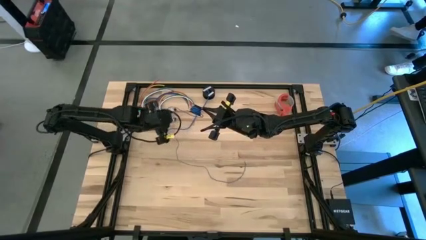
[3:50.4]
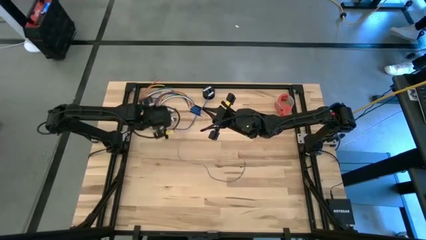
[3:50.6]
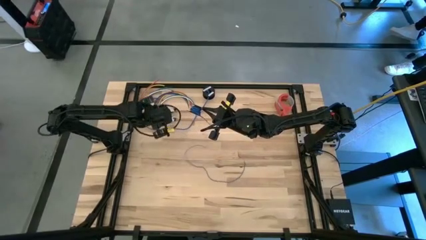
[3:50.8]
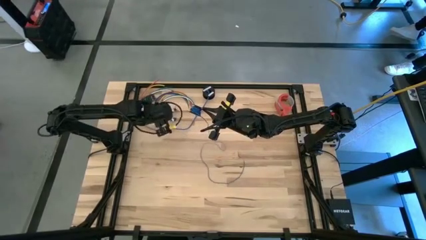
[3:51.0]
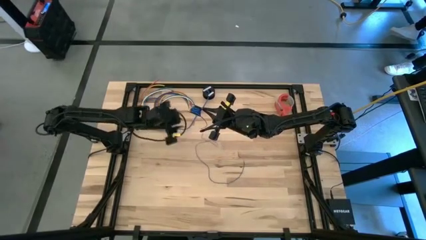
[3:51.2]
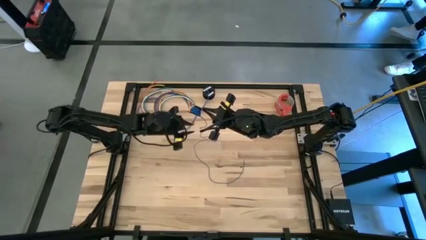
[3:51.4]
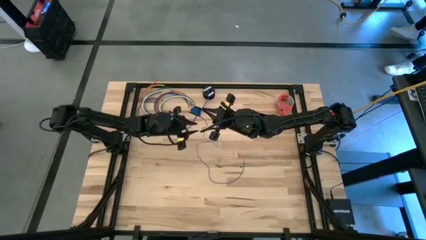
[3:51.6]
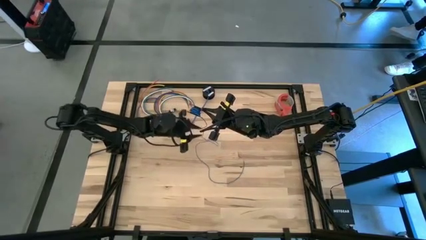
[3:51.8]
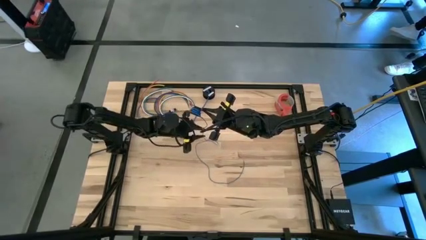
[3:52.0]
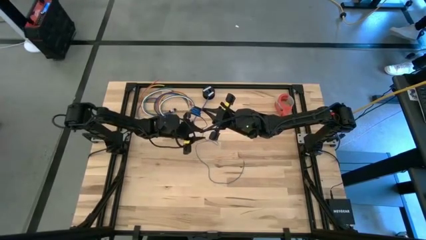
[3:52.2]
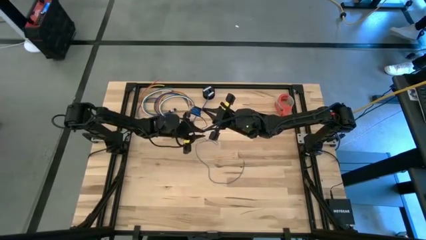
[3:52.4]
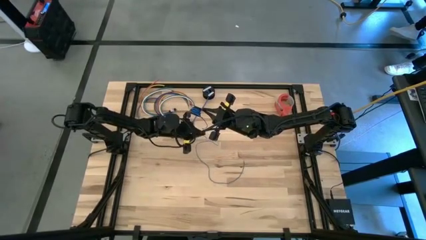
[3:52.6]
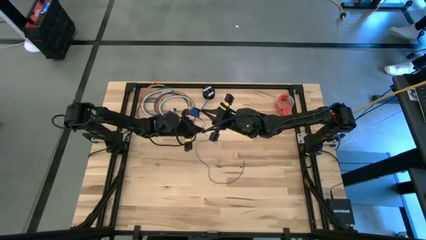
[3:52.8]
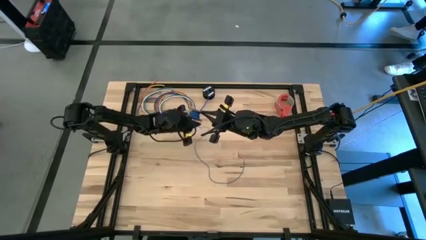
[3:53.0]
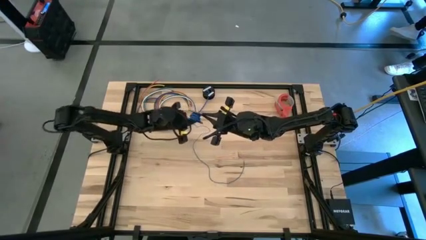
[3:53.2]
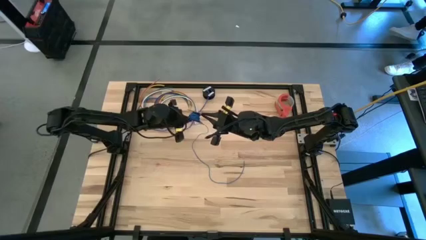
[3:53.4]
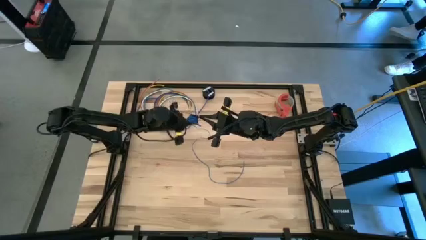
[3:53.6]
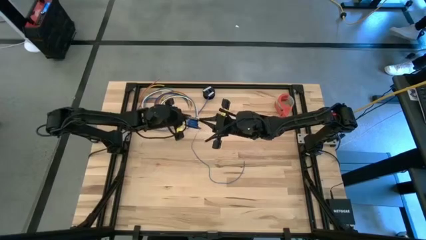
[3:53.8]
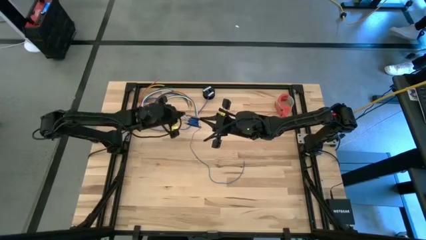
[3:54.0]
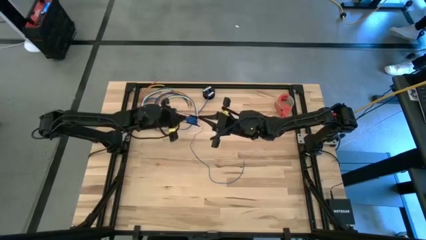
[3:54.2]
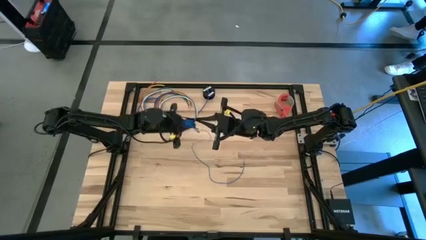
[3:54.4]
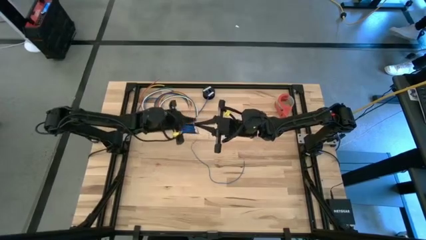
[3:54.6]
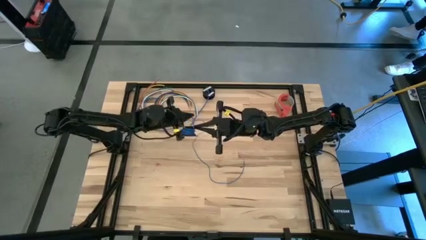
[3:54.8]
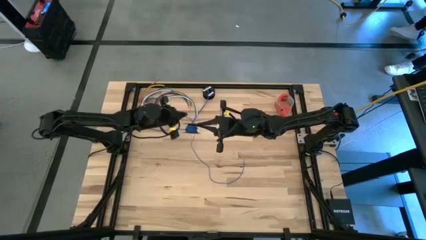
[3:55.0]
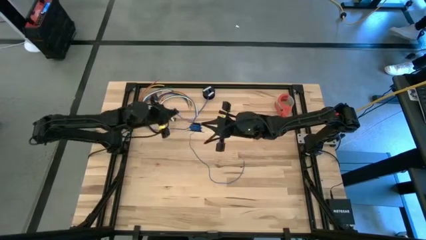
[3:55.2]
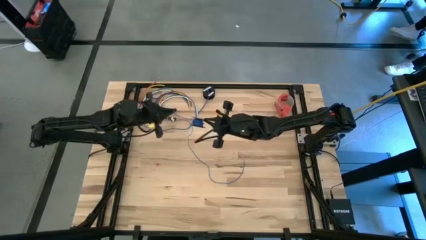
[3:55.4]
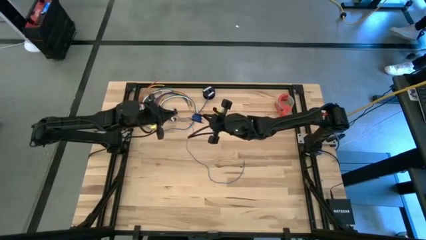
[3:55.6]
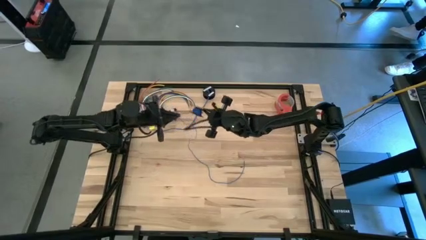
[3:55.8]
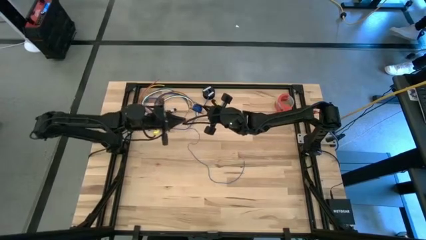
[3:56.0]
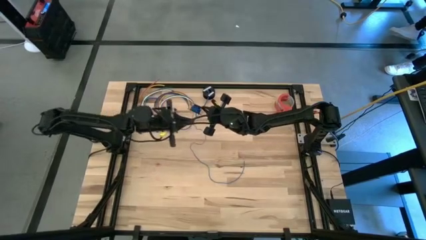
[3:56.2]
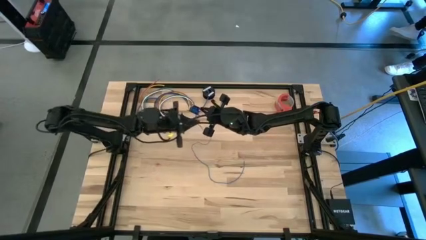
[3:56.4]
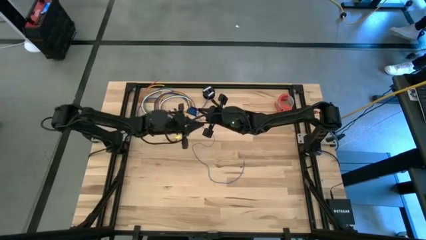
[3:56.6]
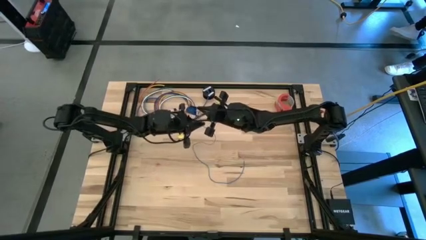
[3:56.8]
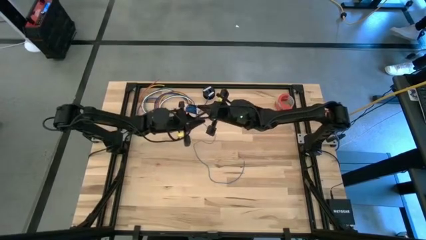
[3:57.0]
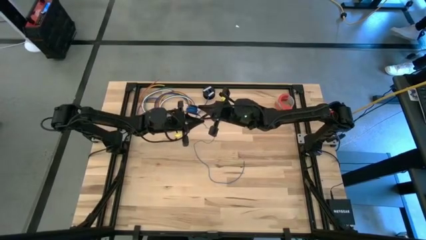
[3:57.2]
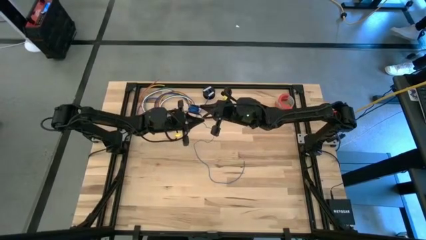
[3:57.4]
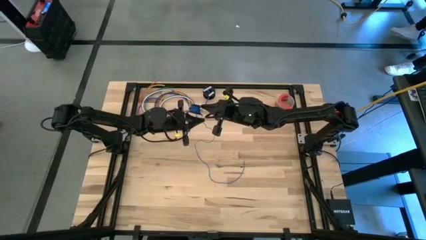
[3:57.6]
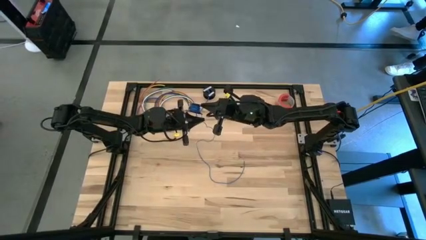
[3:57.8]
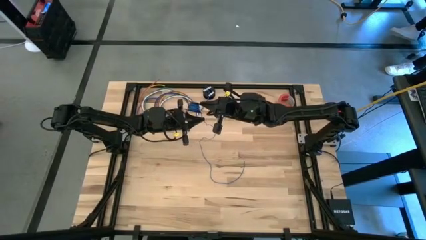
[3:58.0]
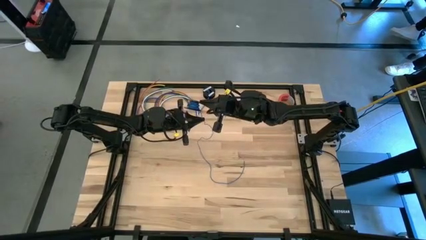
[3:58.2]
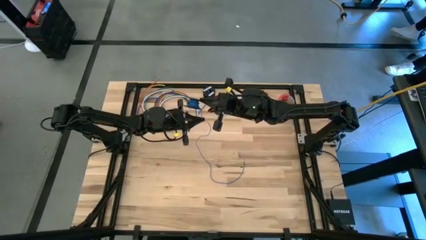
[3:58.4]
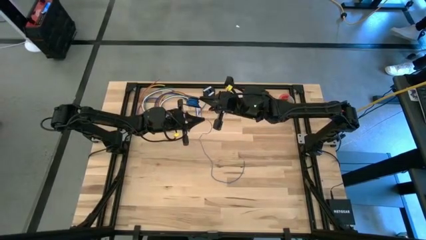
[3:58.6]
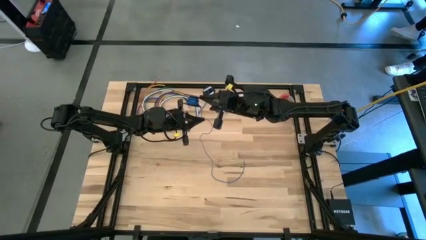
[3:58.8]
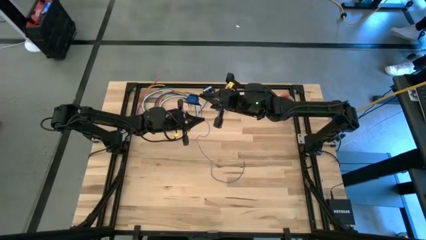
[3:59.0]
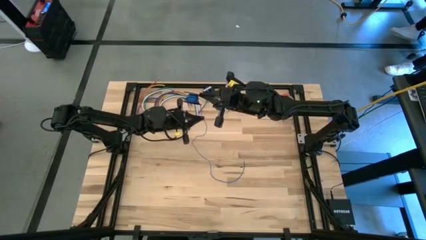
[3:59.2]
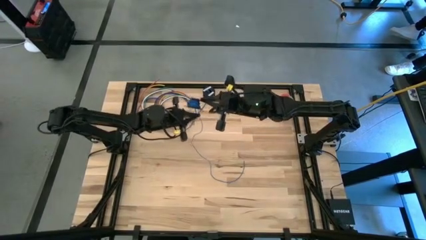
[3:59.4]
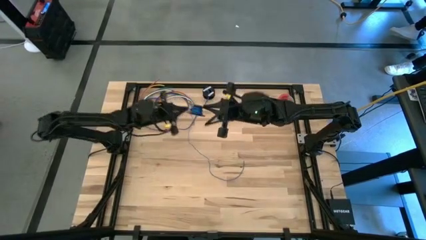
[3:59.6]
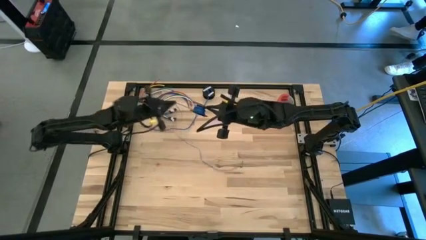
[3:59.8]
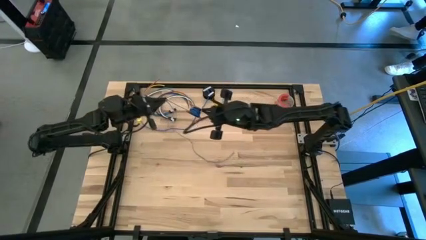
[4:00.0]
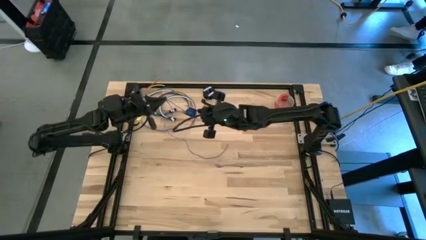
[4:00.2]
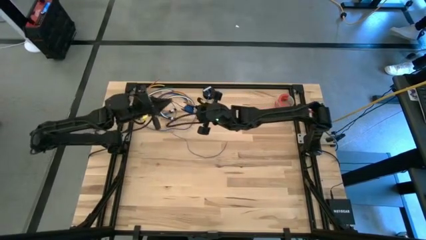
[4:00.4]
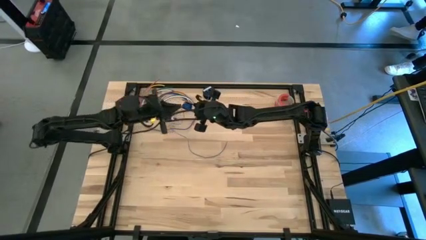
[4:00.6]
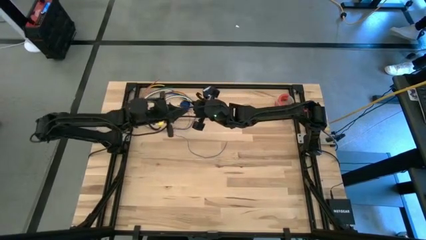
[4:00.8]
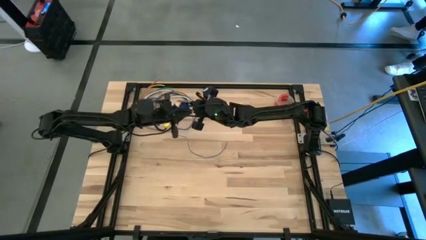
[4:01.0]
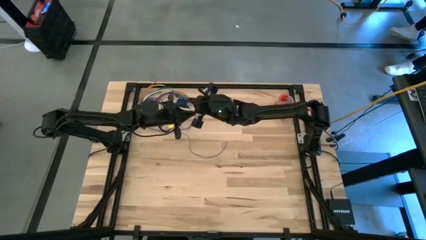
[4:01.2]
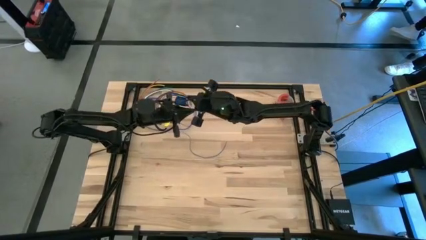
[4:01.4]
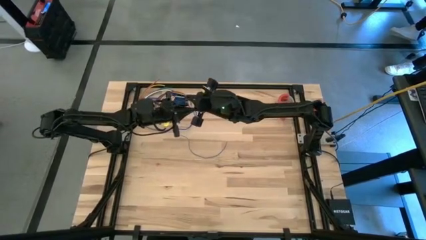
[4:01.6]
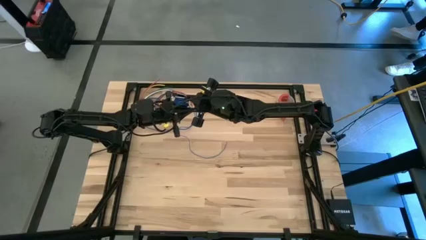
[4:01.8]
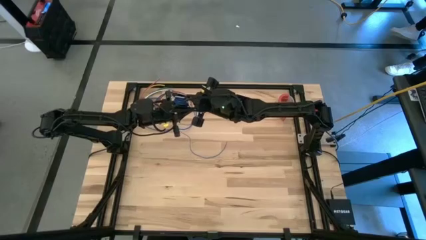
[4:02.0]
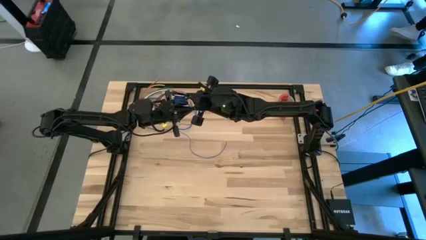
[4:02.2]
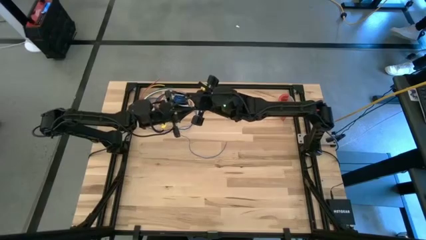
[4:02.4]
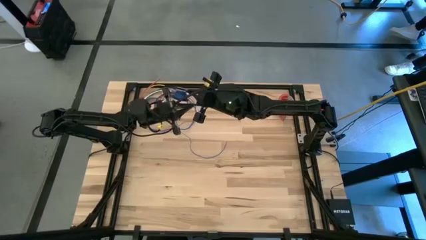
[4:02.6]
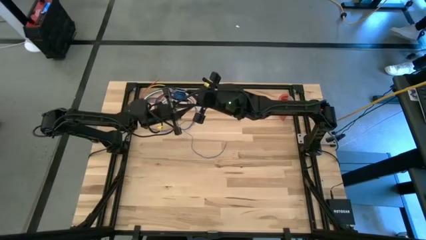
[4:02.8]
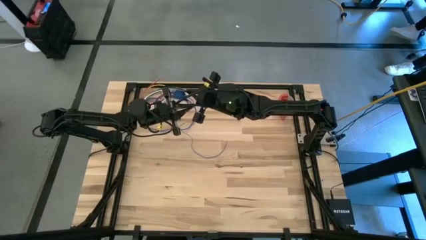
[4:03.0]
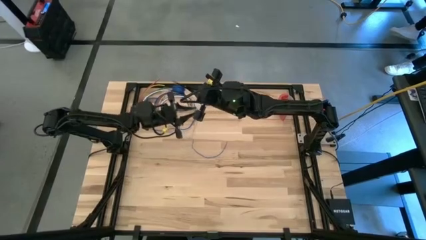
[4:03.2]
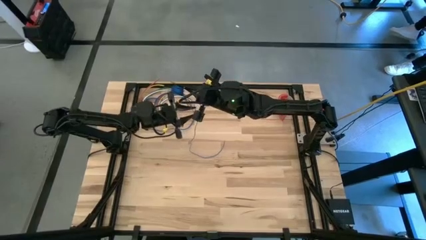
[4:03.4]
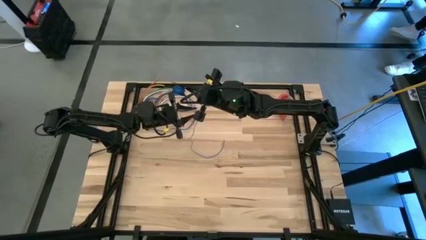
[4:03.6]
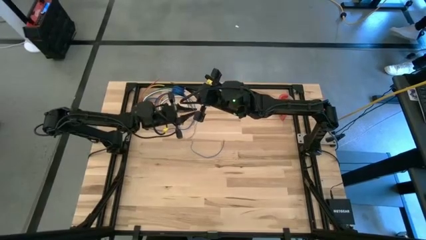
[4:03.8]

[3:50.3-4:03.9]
Task: Coil cords
Coil the blue wire onto the black spool

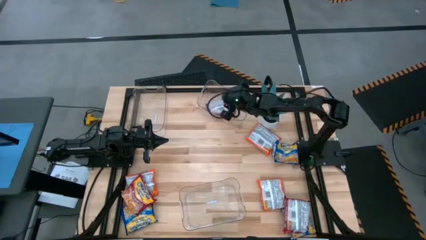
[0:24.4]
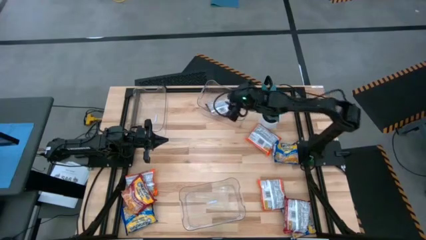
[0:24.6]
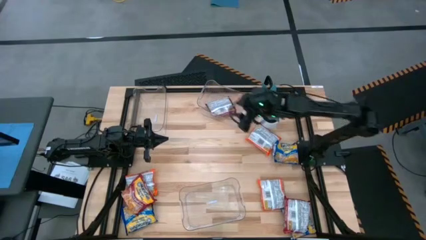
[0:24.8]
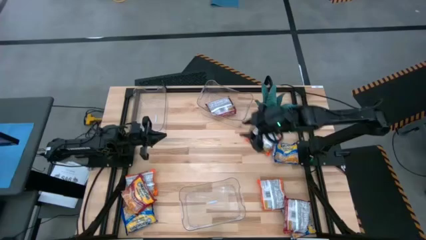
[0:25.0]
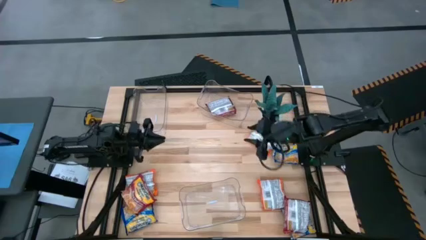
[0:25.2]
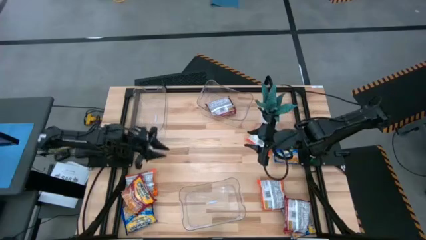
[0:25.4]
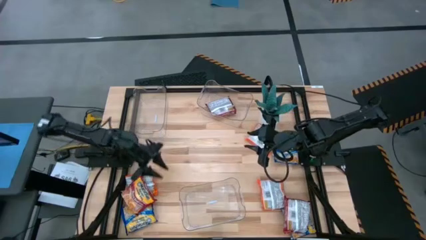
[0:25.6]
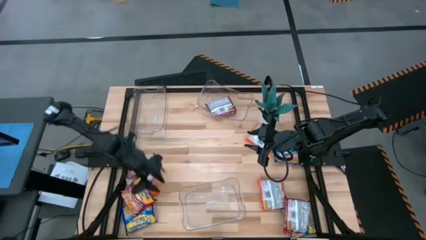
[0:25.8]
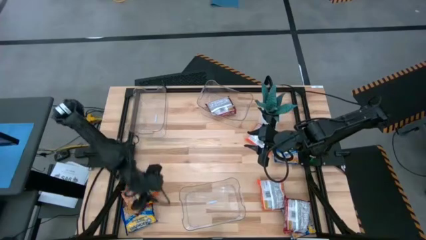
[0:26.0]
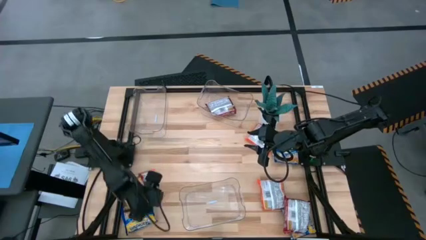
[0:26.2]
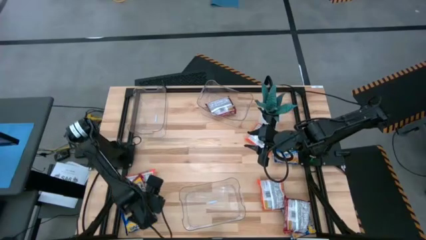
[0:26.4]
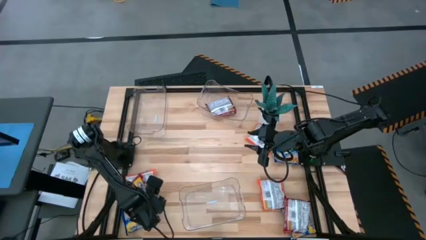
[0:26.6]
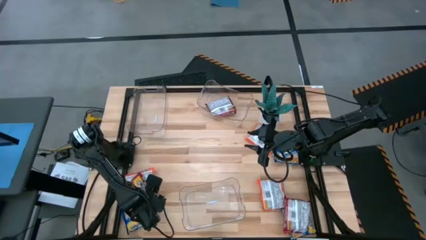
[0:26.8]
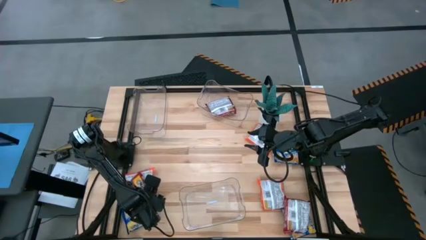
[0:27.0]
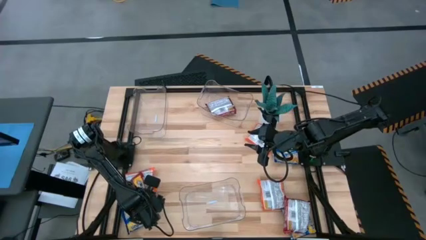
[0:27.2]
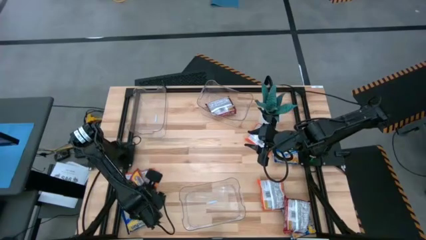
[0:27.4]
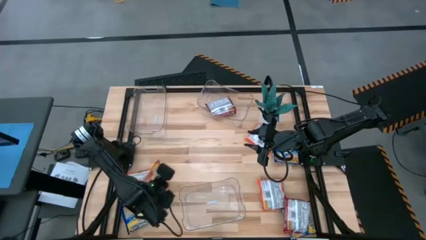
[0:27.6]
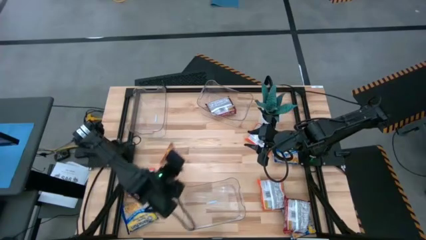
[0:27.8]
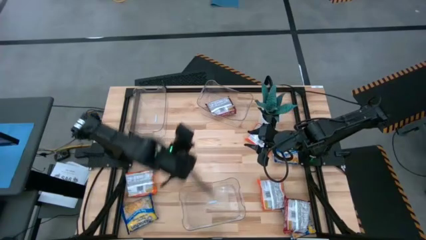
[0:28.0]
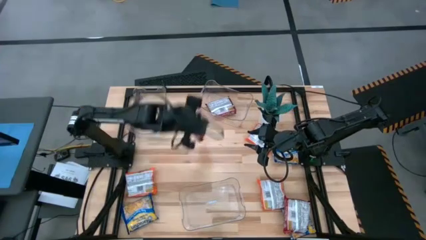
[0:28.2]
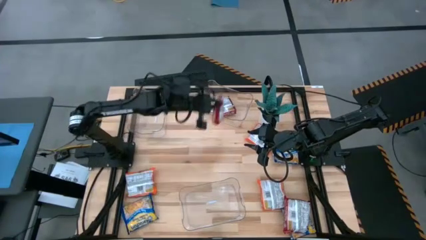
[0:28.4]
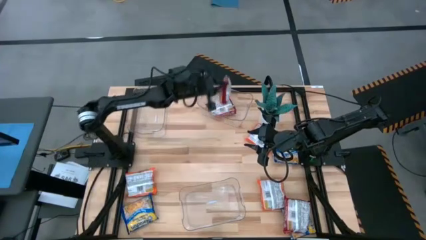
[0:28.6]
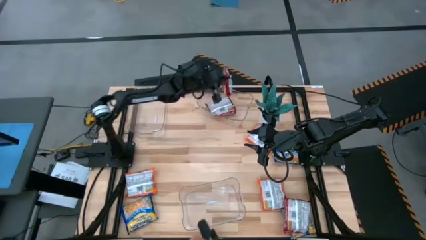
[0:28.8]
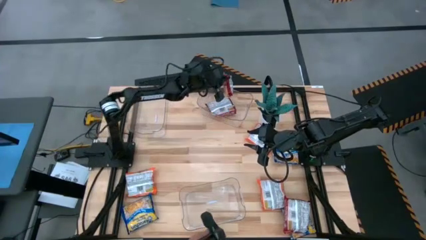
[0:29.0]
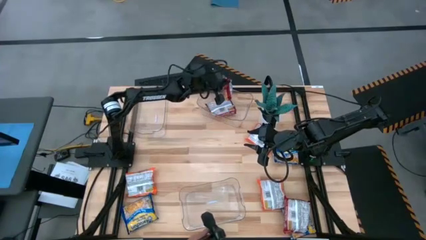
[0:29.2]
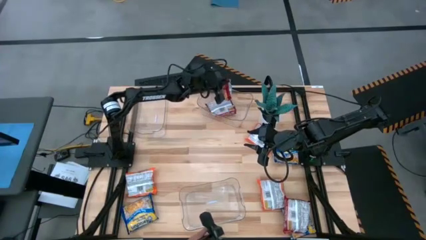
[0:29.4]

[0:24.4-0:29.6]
Task: Sort Maruchan noodles
Put the left red noodle pack into the top right transparent bin
